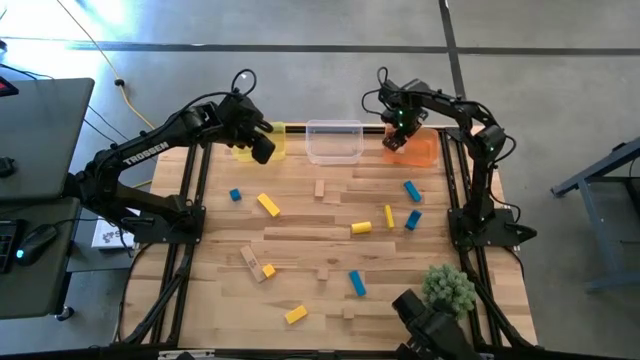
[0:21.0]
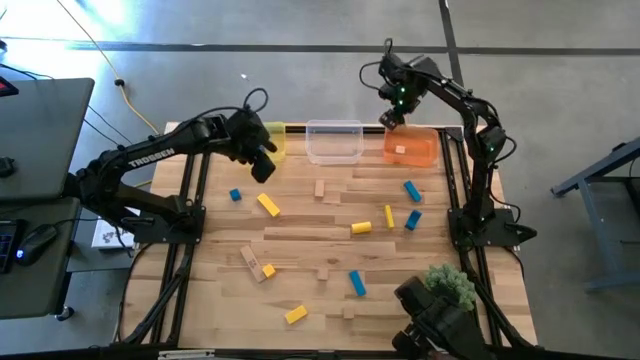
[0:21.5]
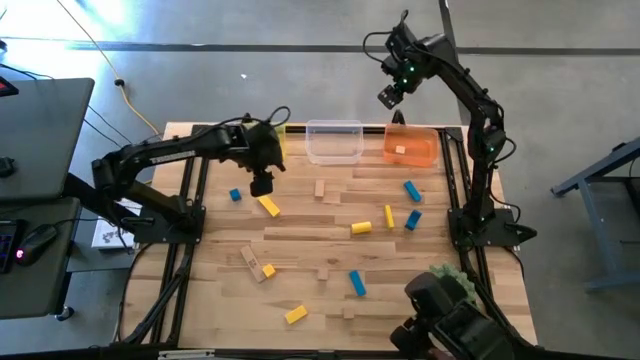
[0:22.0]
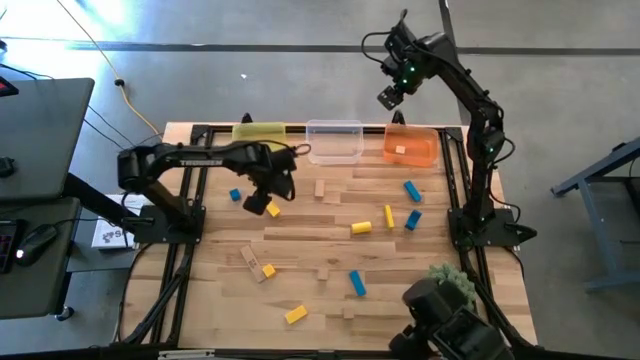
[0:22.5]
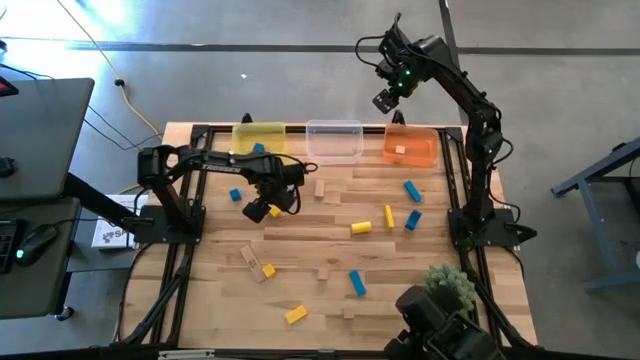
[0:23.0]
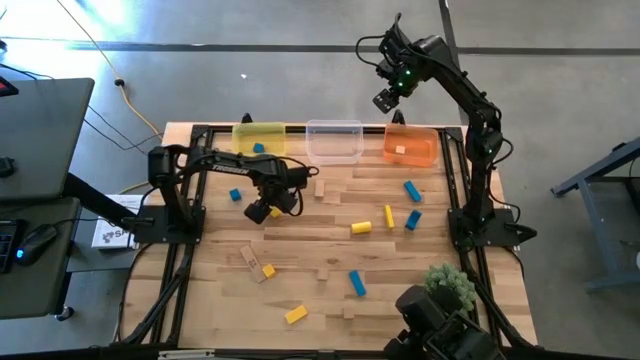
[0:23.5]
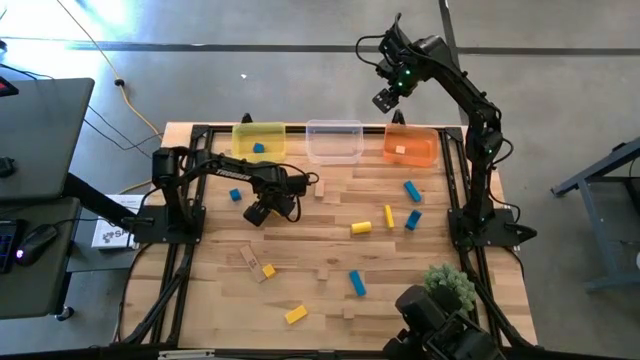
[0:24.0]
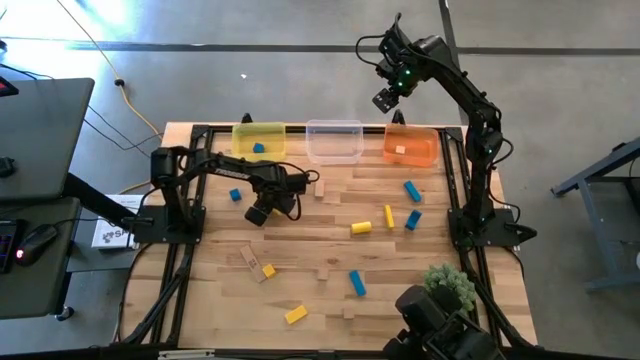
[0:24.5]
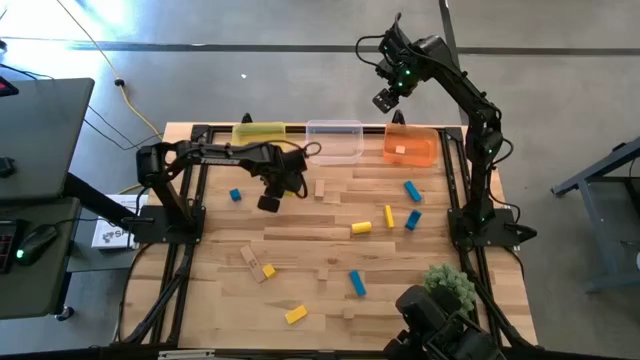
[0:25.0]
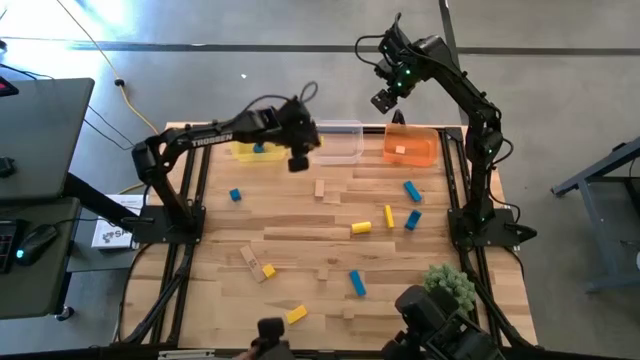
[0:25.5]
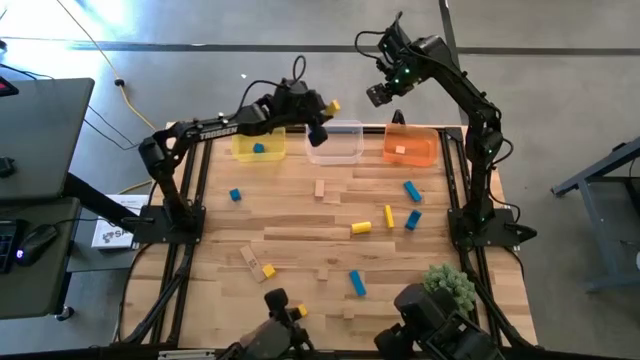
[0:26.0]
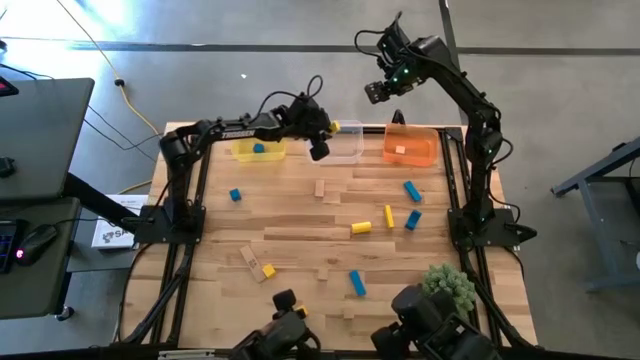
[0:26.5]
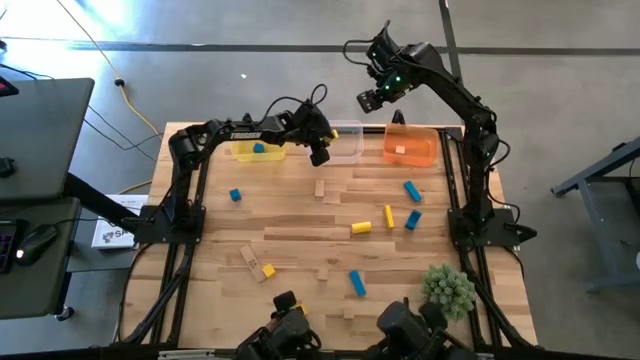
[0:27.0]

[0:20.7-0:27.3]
Task: Sort & place blocks by color
Put the yellow block into the transparent bin

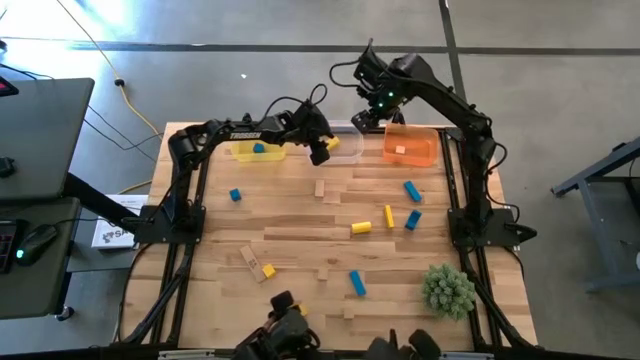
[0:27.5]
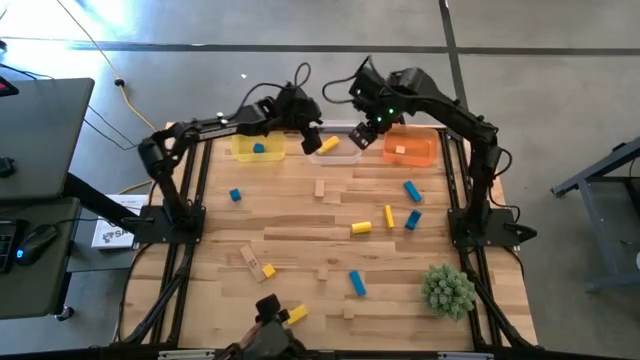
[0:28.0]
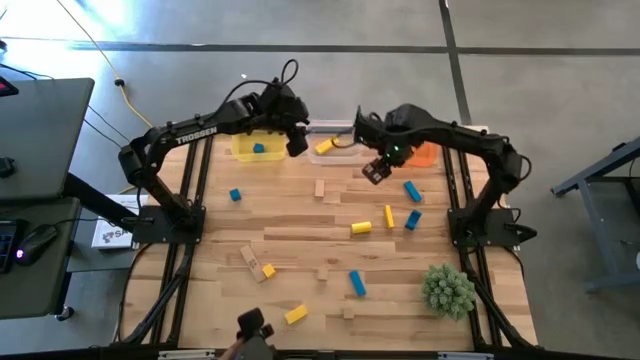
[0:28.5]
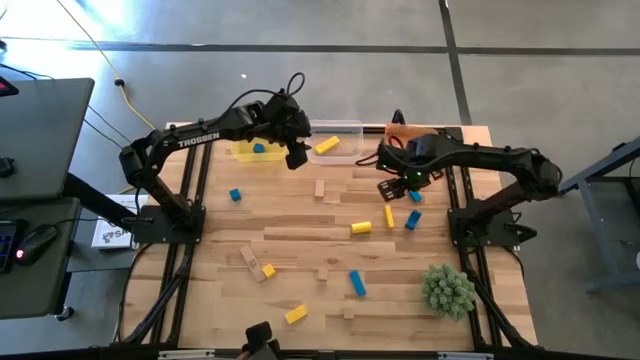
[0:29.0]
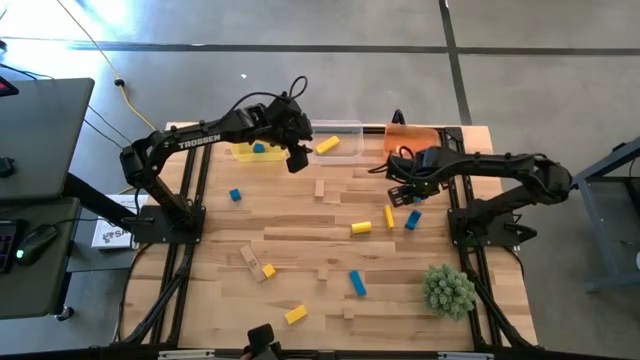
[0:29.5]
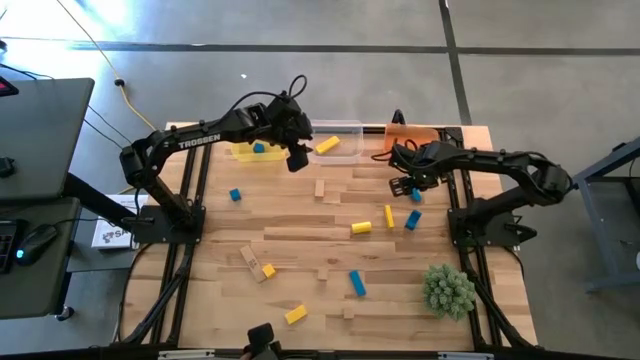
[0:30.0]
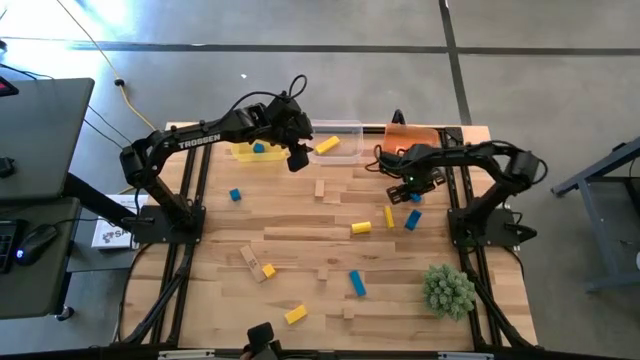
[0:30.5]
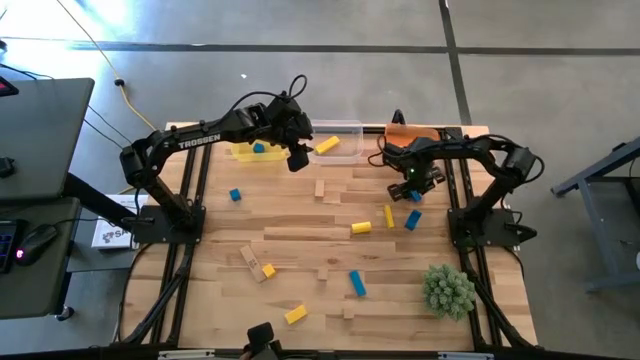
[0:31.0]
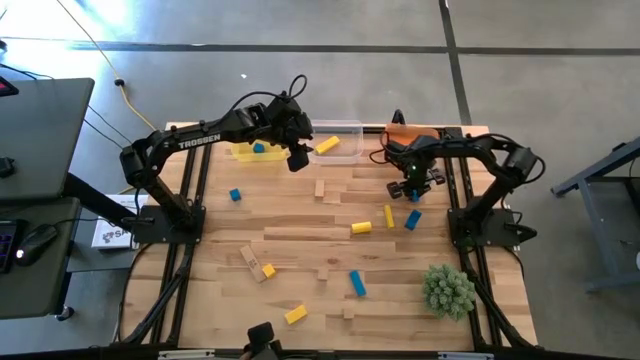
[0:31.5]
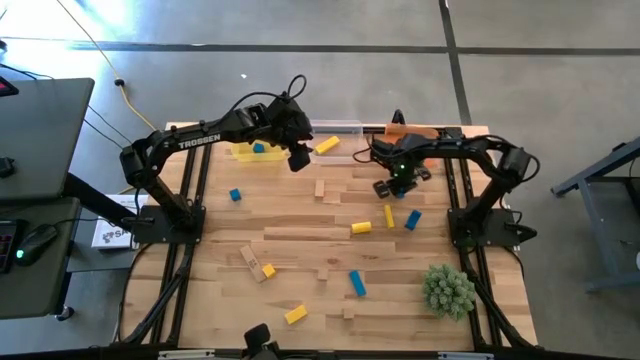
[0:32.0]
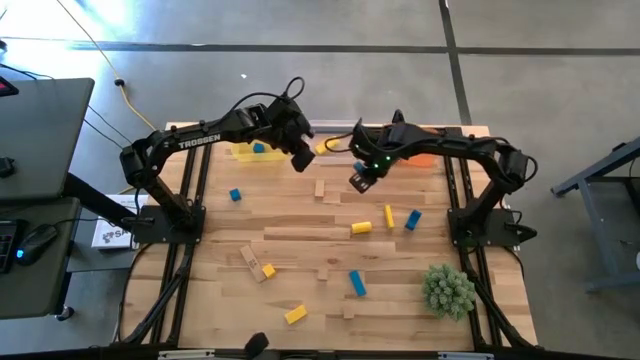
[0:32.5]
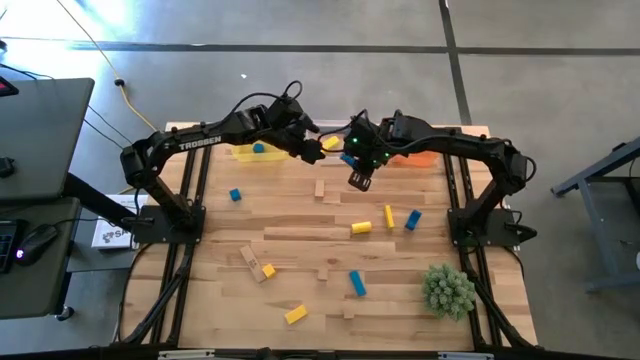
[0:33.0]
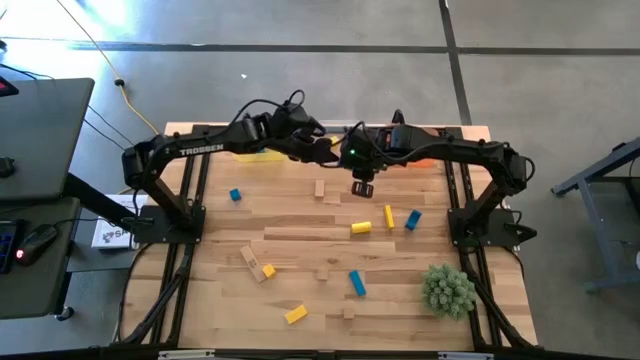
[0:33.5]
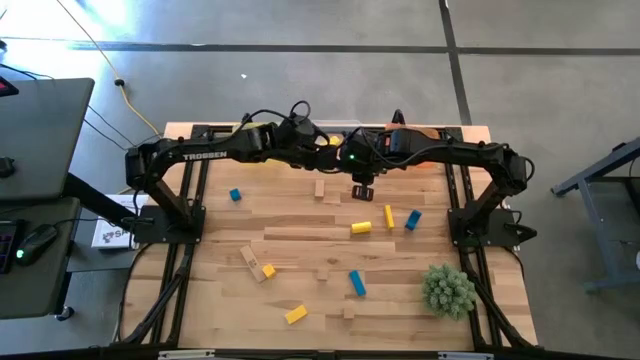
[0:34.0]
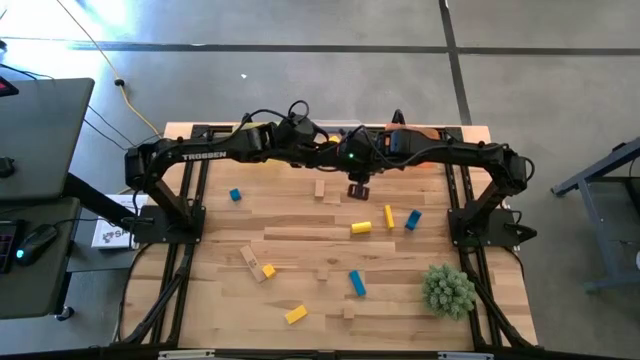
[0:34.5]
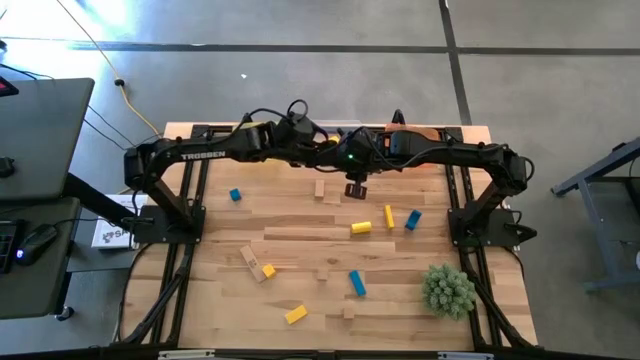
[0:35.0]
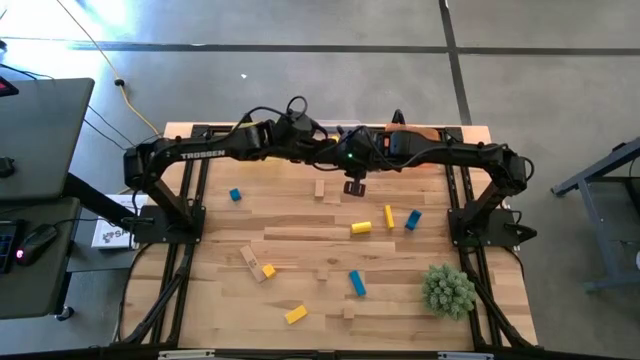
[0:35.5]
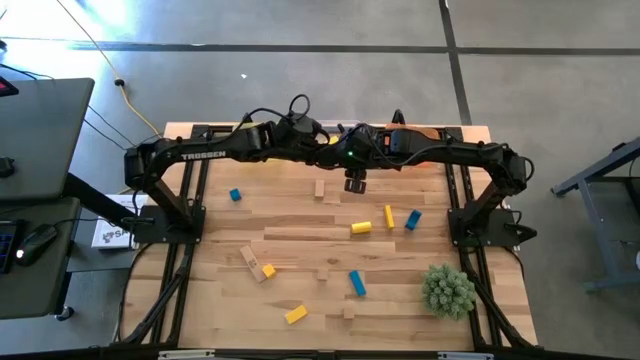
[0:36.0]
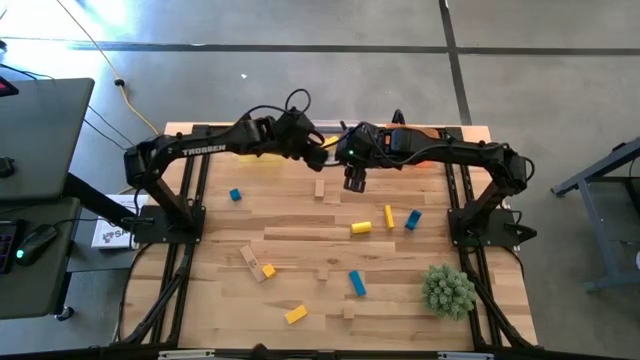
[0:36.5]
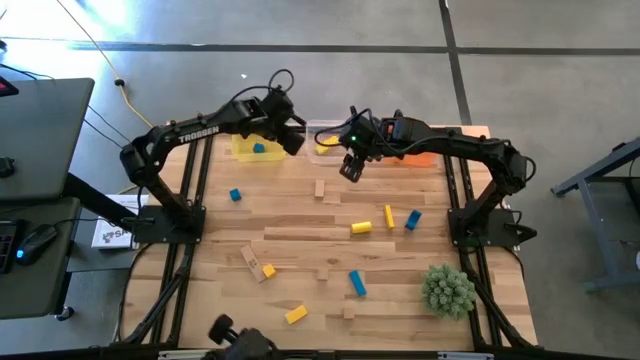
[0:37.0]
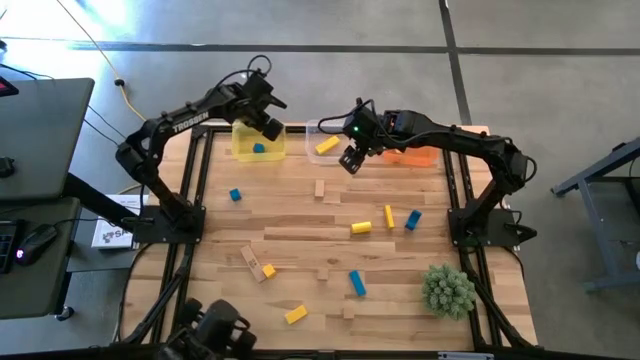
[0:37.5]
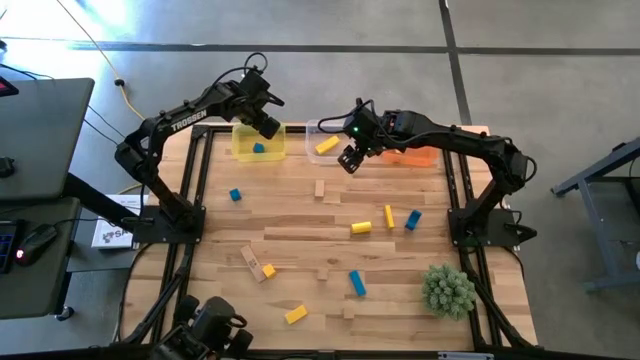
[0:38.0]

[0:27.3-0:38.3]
Put the blue block into the yellow bin

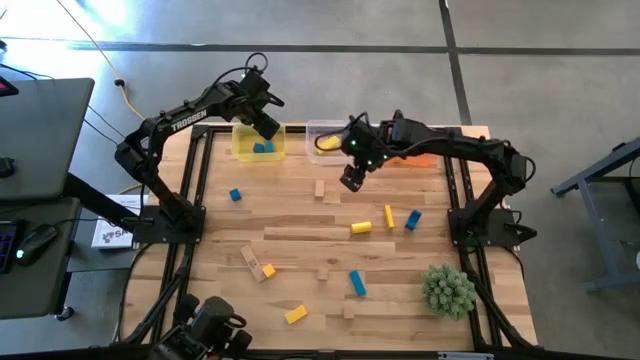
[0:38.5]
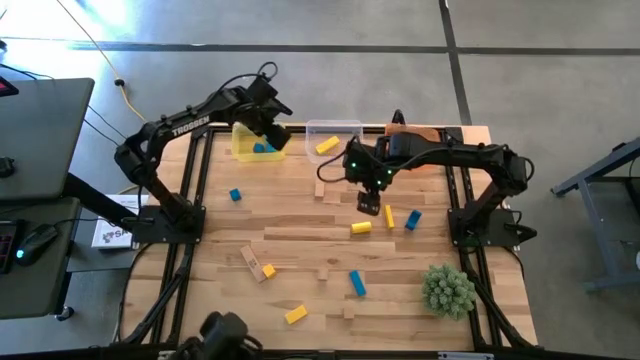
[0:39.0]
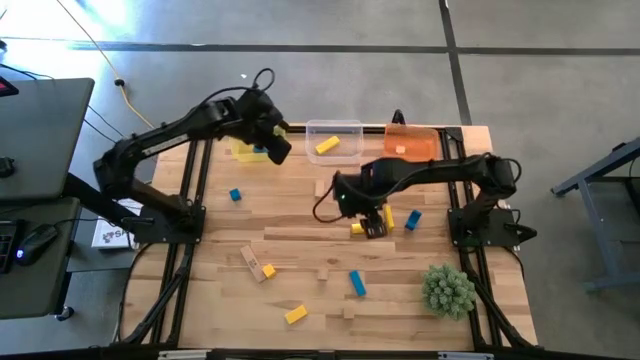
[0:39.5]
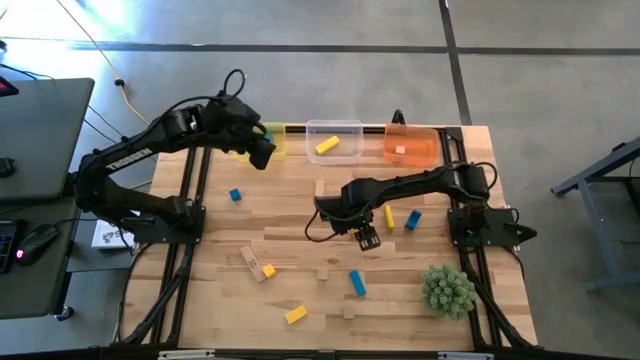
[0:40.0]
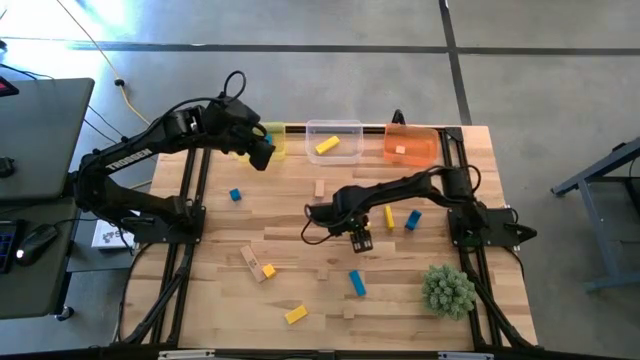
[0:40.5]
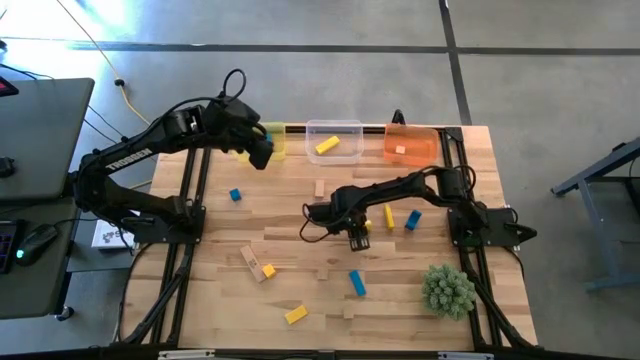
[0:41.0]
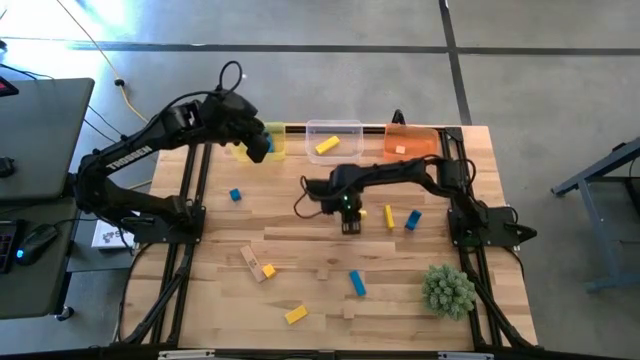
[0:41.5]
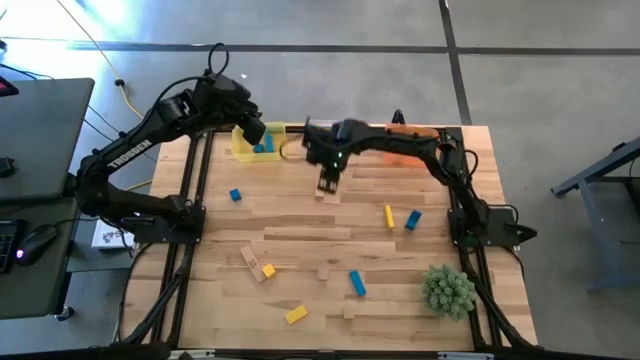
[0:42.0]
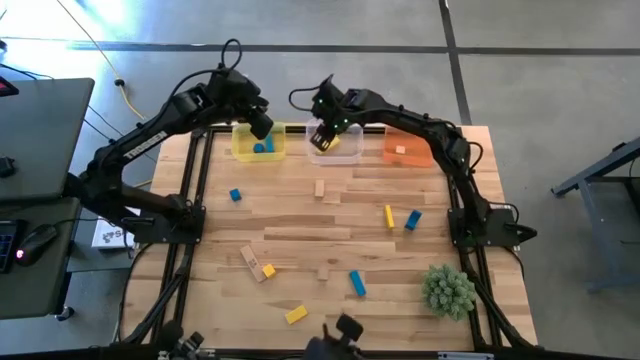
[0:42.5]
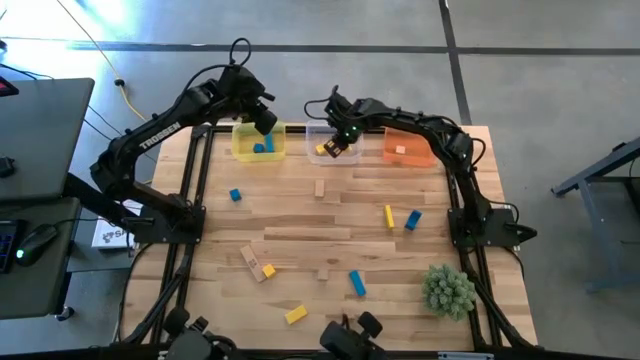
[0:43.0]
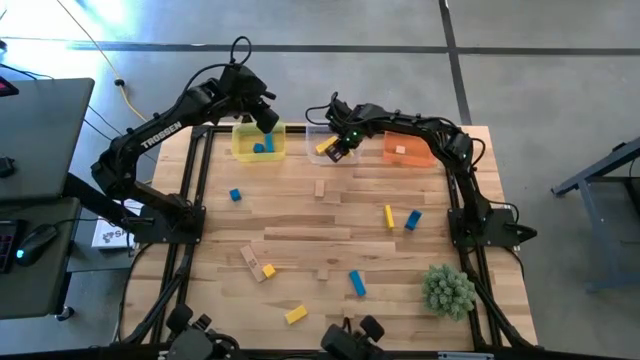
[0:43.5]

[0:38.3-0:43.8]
Put the yellow block into the transparent bin
